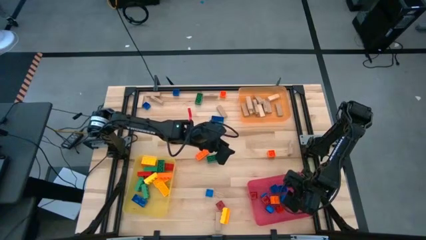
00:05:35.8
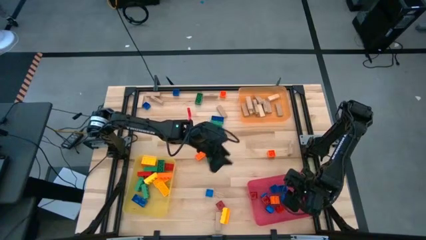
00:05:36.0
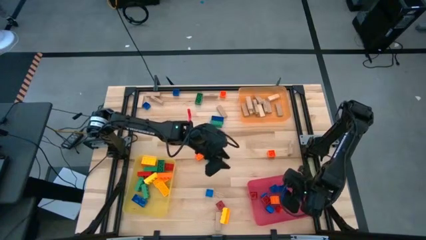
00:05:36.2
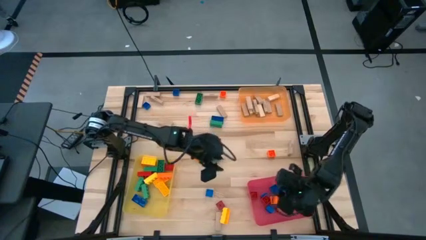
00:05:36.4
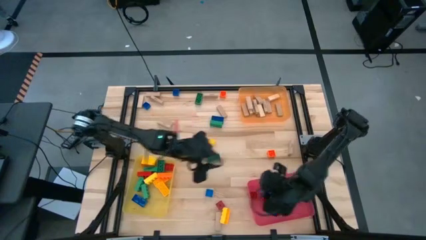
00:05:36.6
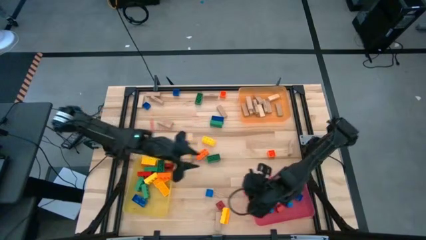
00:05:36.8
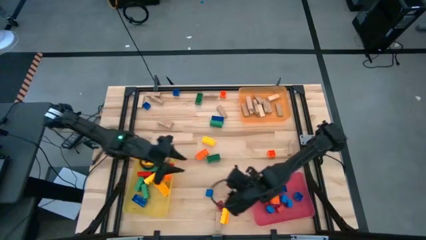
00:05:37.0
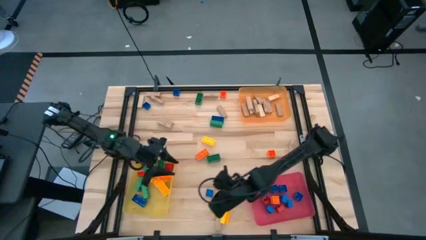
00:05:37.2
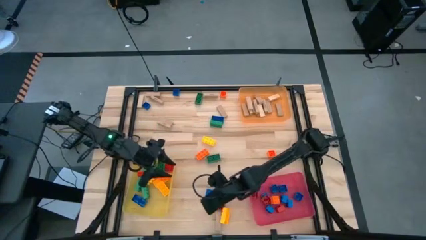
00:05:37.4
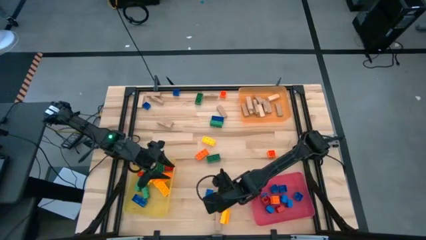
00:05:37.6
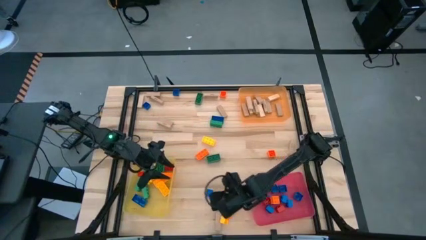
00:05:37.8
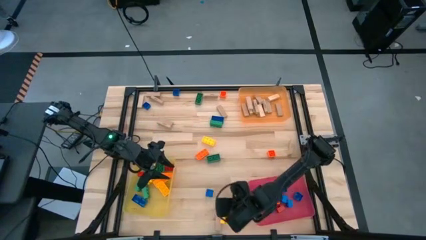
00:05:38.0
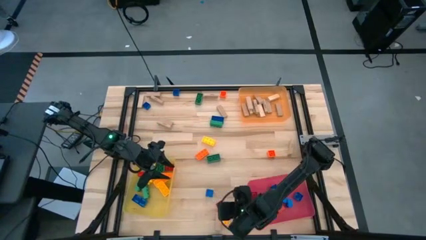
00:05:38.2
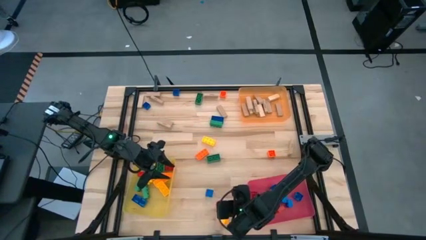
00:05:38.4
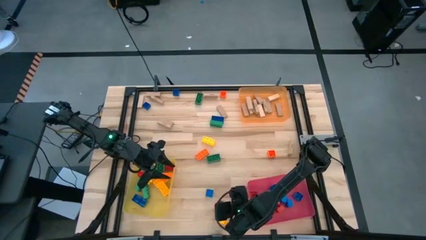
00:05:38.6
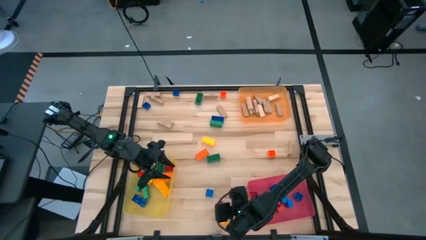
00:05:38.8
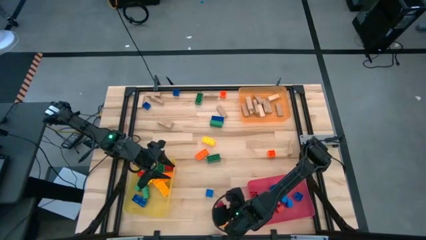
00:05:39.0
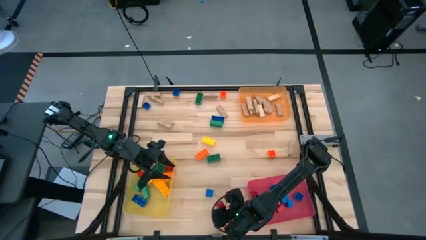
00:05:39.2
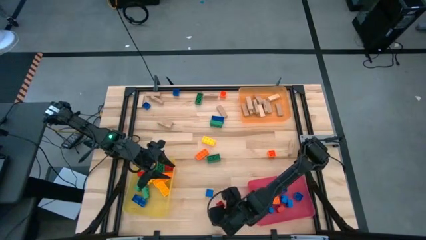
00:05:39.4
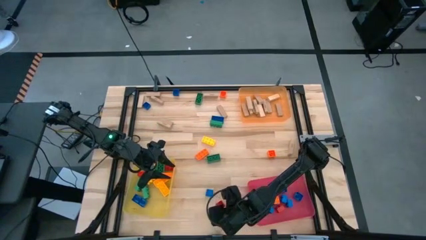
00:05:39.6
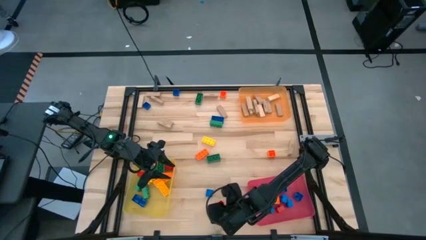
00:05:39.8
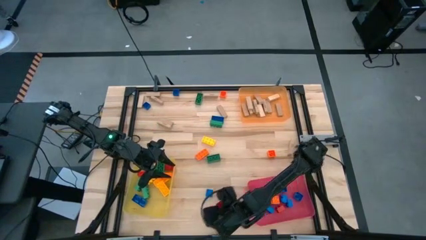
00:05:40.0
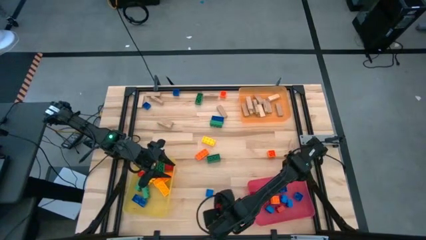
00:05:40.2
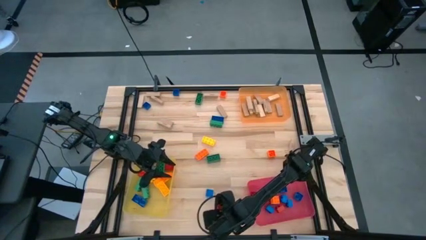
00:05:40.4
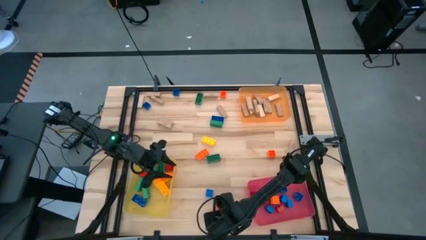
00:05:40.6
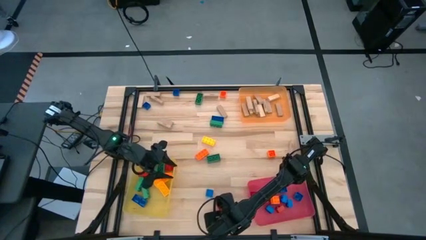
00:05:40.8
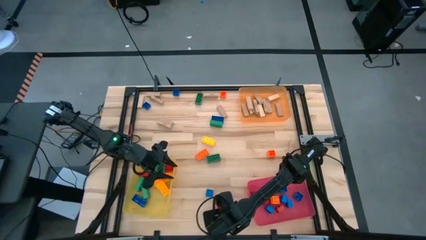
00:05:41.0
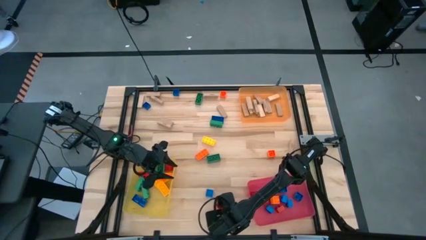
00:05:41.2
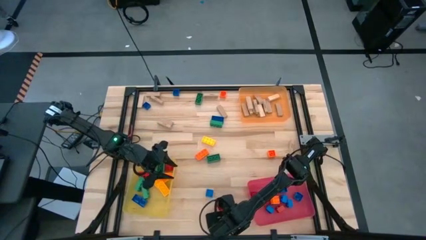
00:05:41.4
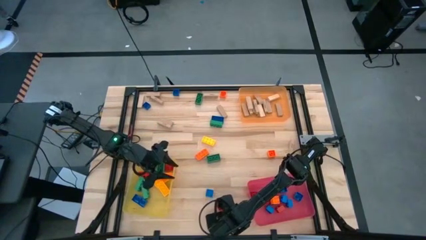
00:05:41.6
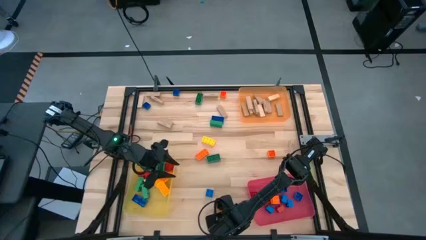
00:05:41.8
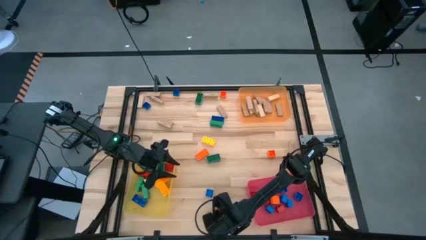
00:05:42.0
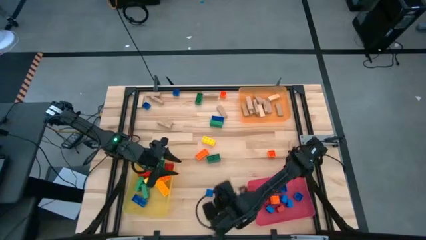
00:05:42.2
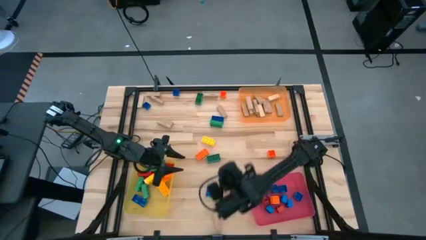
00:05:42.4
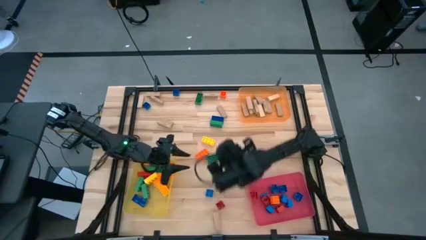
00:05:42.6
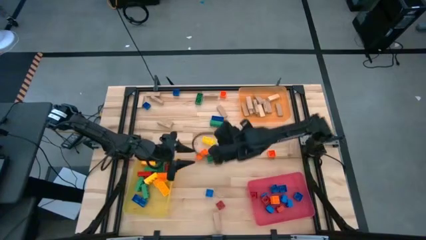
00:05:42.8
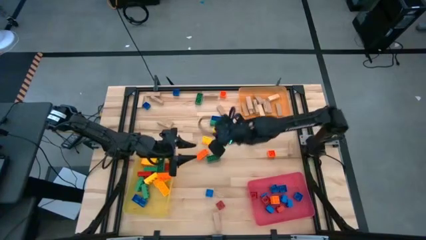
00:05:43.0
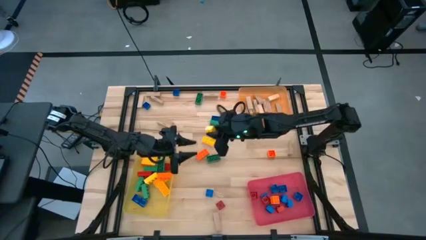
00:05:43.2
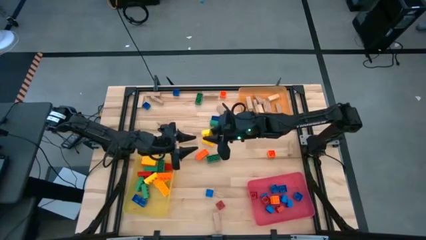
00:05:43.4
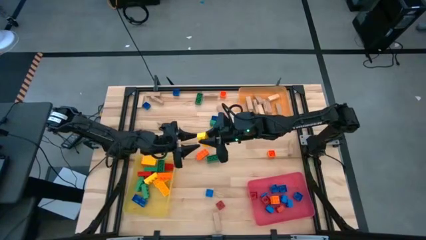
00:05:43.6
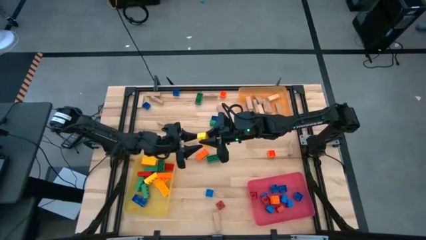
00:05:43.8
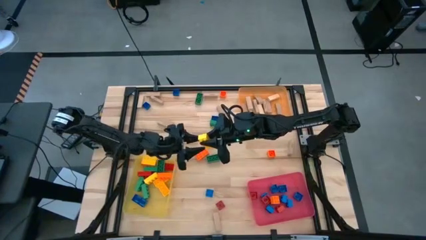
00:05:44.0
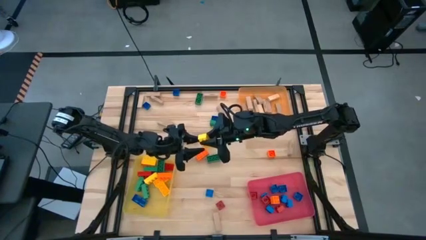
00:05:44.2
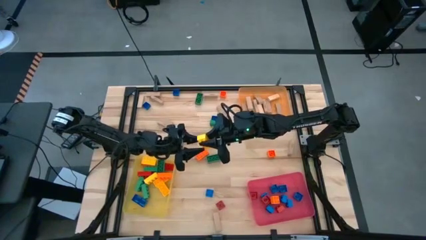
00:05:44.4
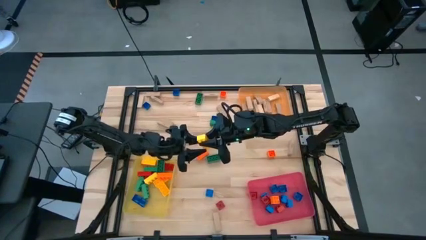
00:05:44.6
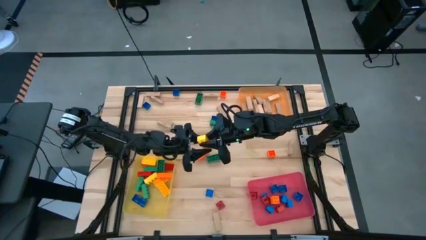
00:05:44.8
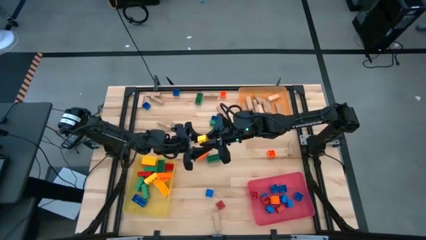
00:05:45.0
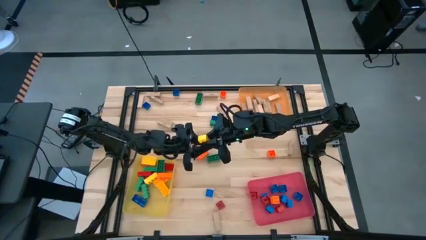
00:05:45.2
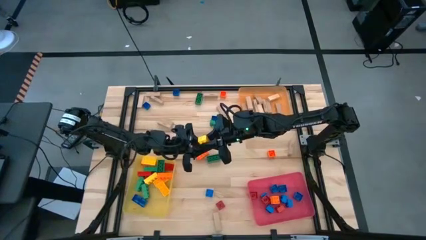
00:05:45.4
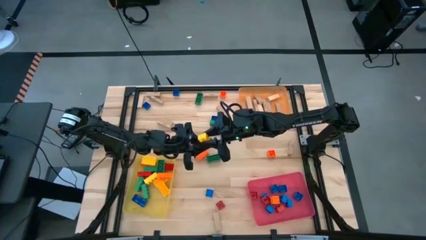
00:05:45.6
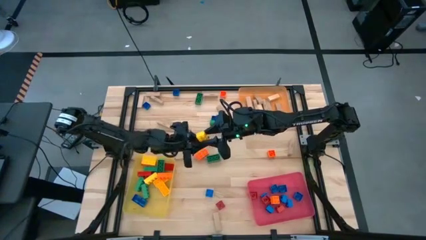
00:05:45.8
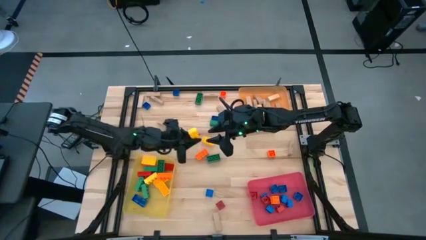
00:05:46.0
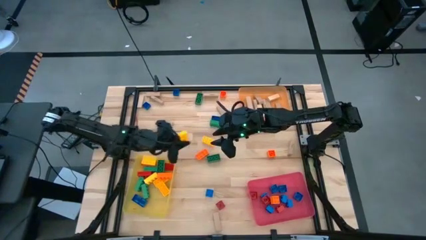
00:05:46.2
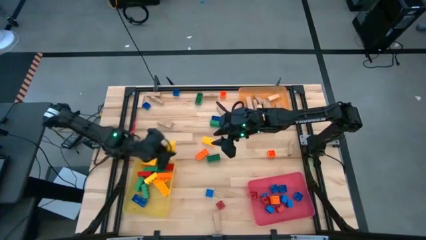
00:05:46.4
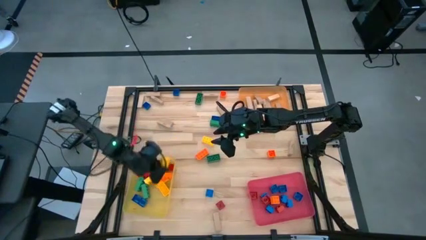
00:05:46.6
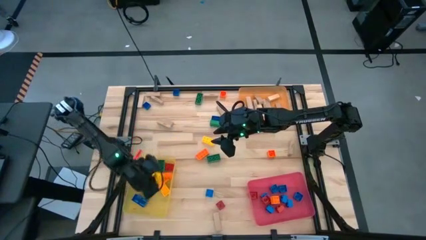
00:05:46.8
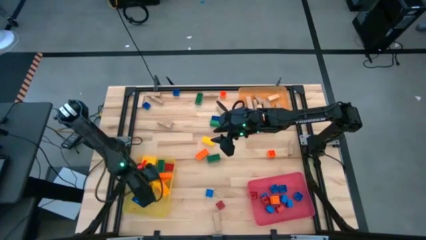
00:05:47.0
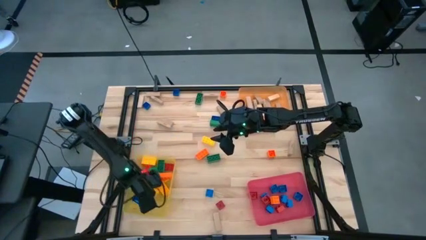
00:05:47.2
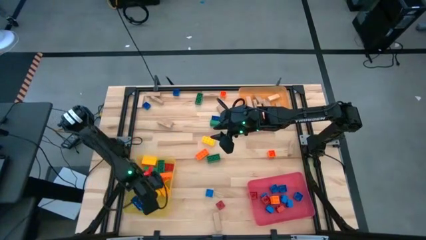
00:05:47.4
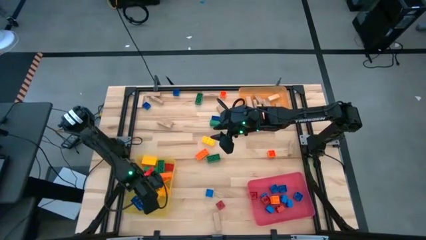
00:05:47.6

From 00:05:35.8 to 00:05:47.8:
Task: Sort blocks by size
Put the large yellow game piece into the yellow bin

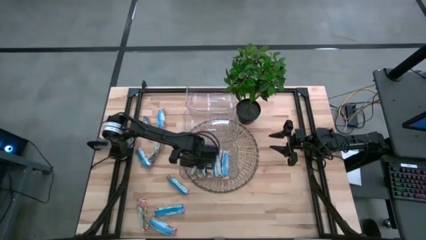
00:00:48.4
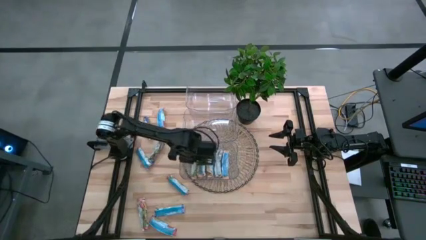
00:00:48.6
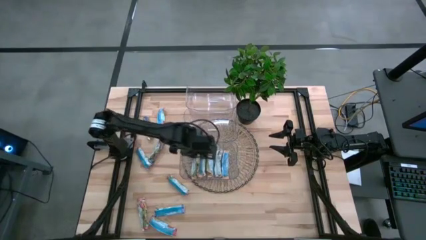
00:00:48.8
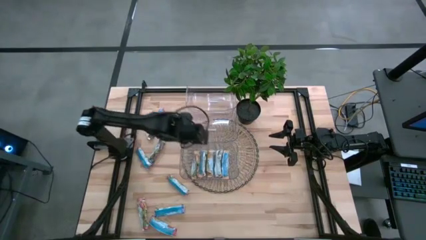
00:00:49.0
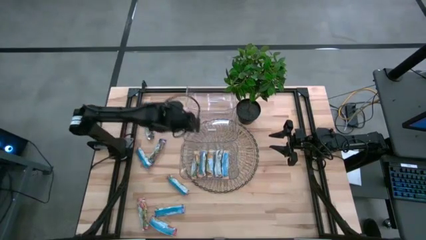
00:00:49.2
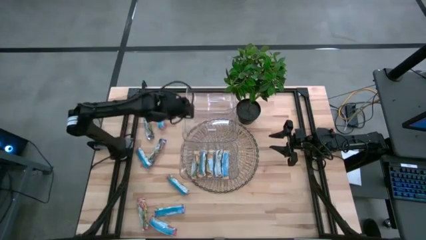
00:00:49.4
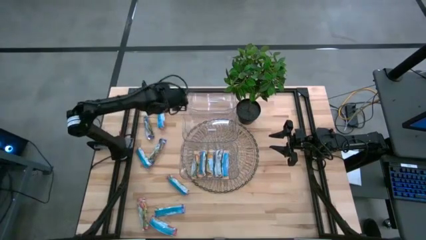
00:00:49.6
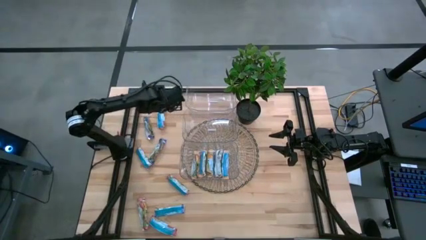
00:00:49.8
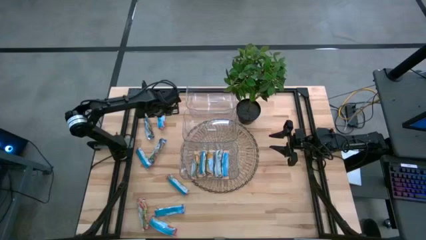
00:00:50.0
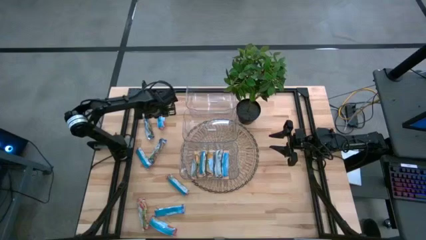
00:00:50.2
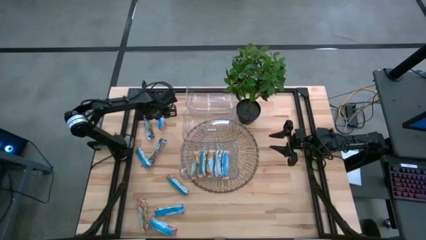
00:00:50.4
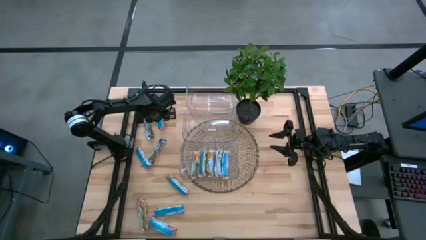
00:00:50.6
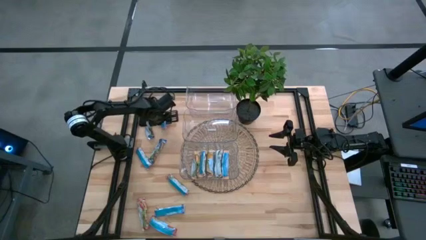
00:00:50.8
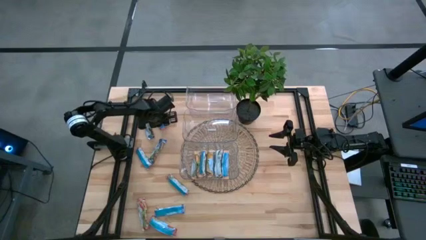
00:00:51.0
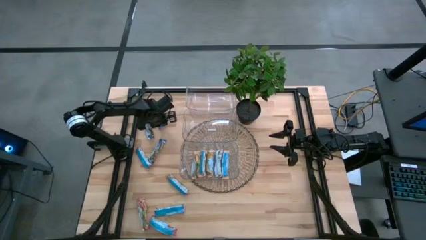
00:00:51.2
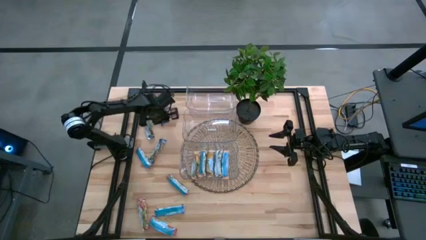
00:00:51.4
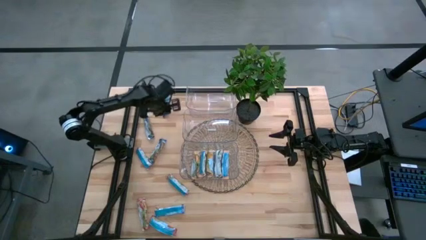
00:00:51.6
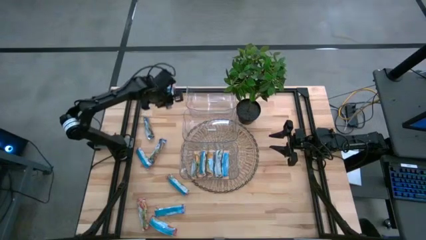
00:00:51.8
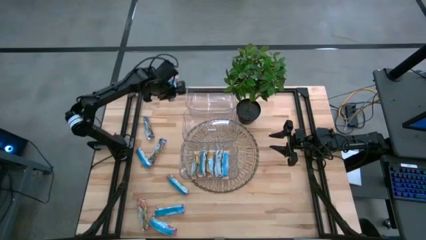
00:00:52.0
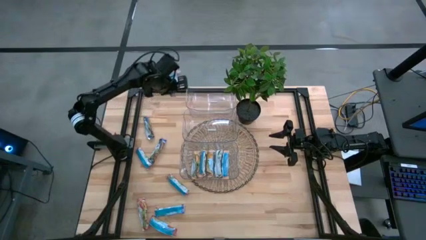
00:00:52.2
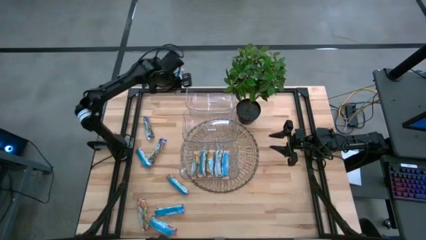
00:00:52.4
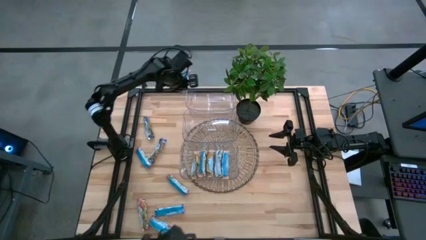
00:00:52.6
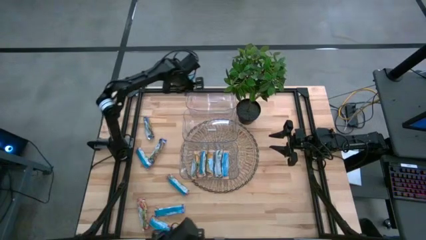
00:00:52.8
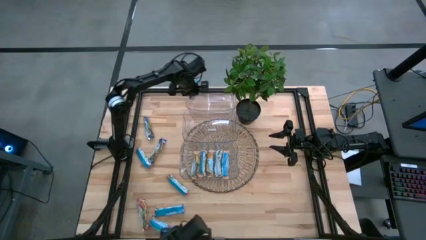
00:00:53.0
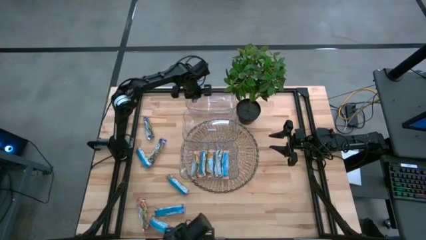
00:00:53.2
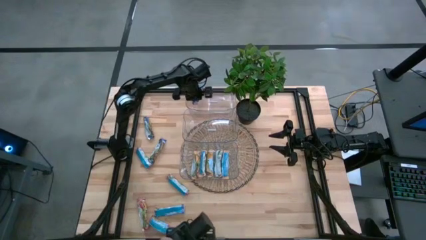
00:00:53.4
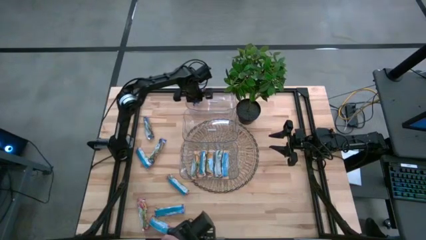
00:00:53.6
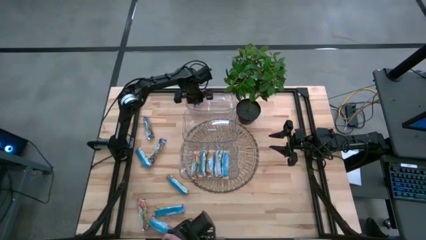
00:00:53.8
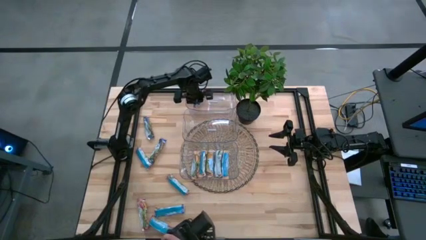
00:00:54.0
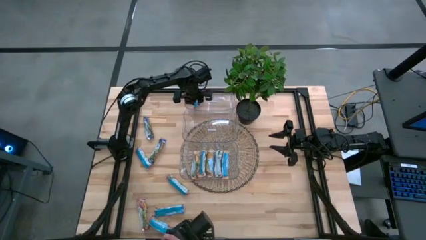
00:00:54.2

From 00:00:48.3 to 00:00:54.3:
Task: Pick and place Granola Bars by type
Put the red granola bar into the top transparent bin
